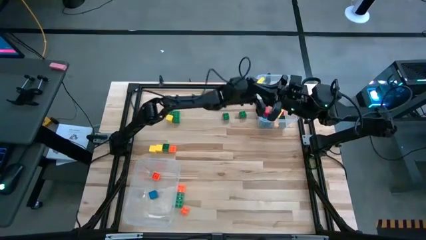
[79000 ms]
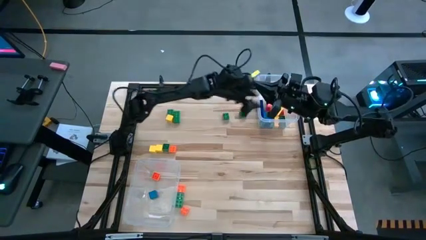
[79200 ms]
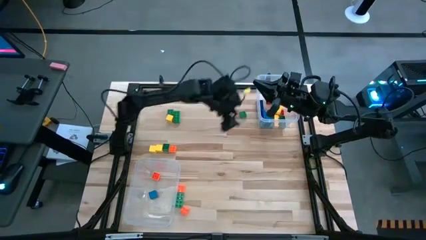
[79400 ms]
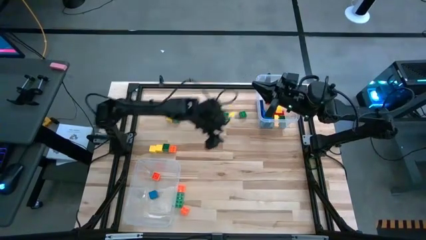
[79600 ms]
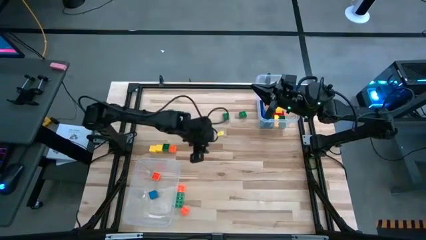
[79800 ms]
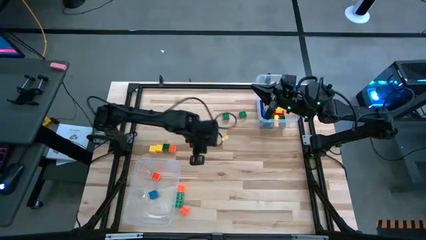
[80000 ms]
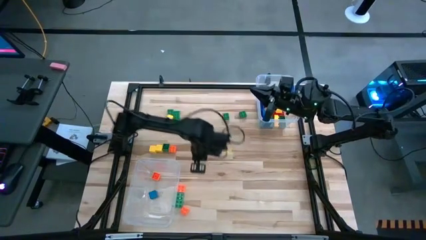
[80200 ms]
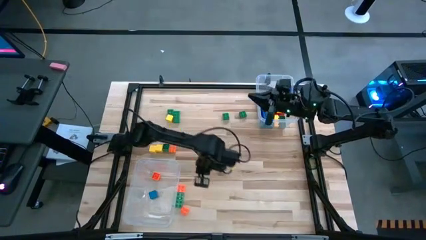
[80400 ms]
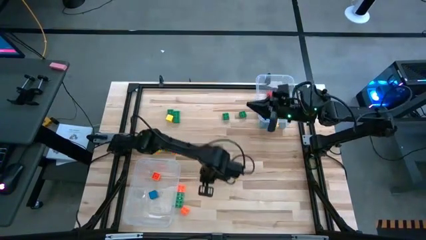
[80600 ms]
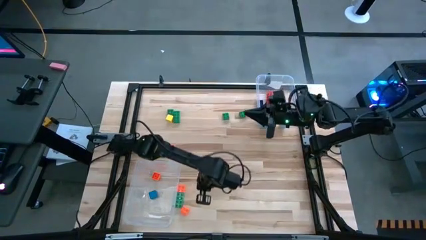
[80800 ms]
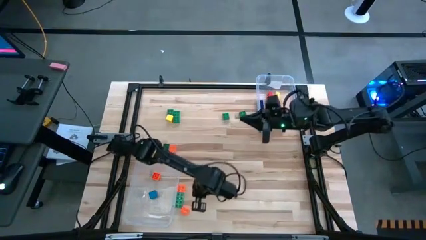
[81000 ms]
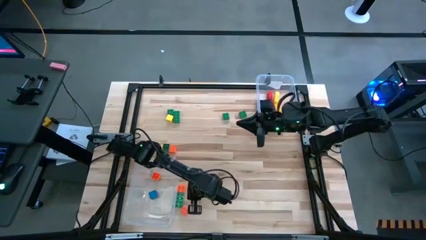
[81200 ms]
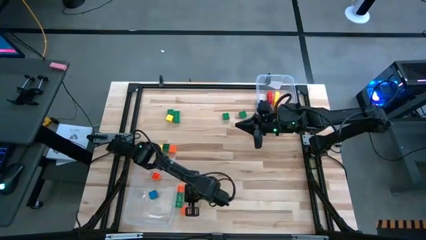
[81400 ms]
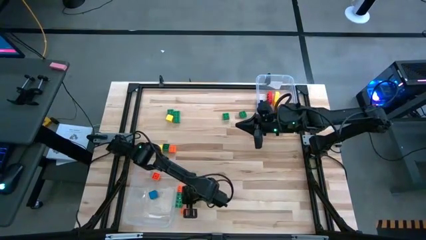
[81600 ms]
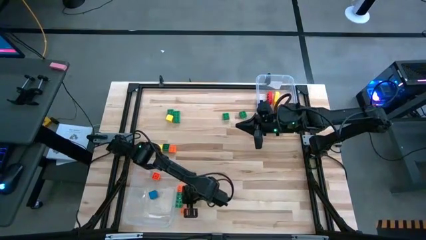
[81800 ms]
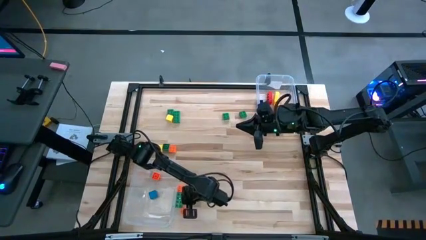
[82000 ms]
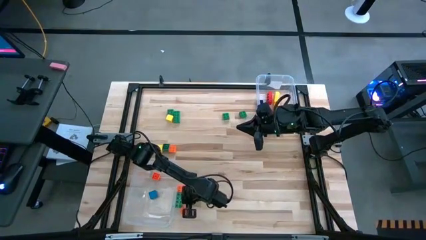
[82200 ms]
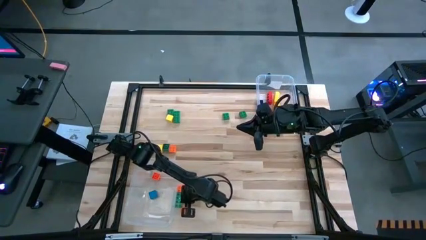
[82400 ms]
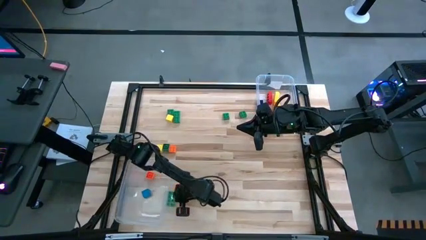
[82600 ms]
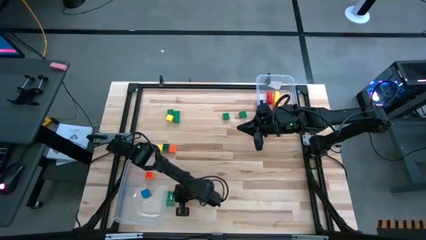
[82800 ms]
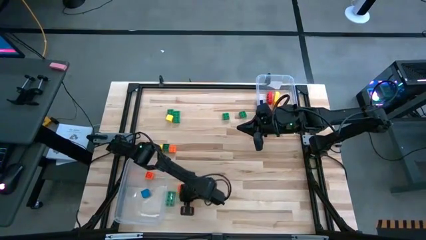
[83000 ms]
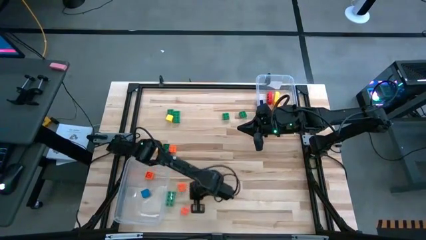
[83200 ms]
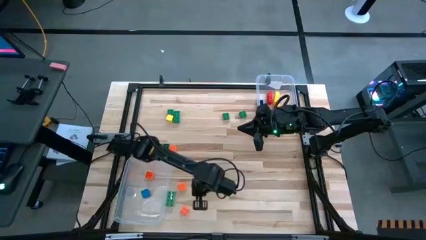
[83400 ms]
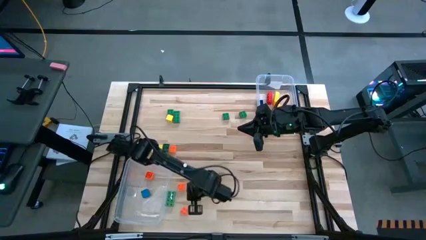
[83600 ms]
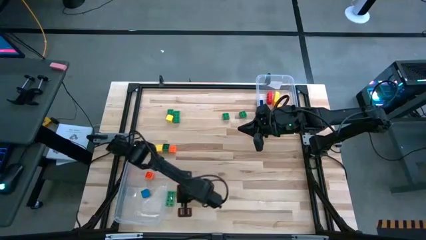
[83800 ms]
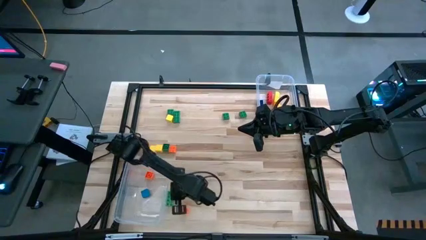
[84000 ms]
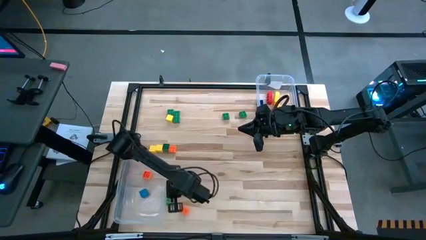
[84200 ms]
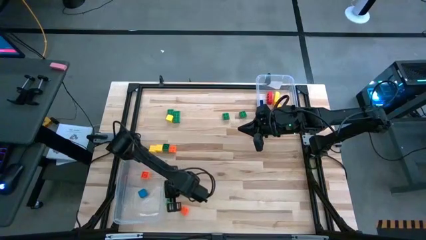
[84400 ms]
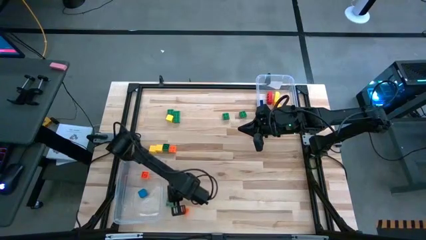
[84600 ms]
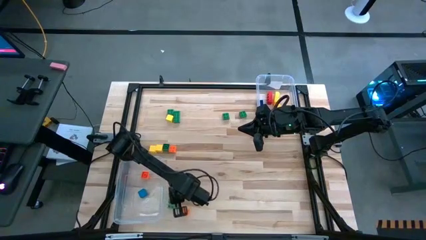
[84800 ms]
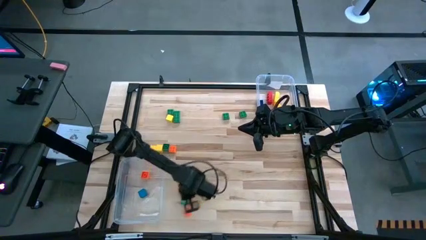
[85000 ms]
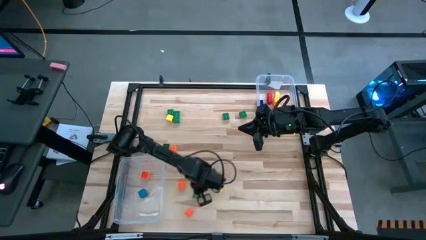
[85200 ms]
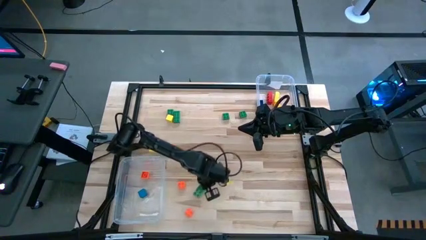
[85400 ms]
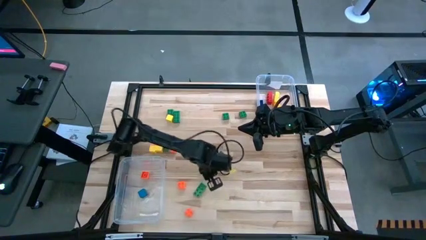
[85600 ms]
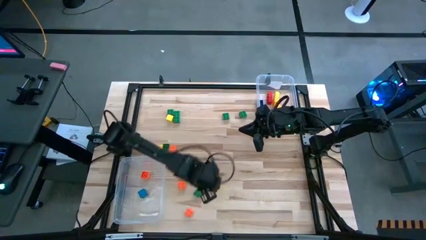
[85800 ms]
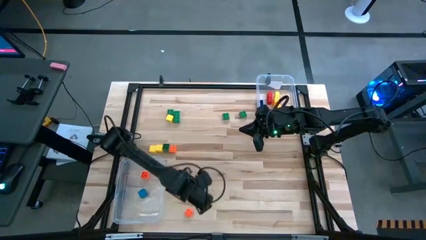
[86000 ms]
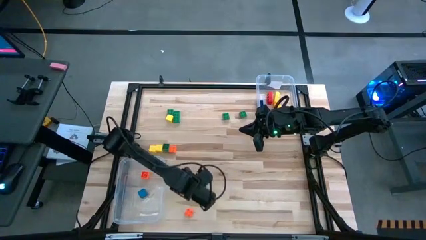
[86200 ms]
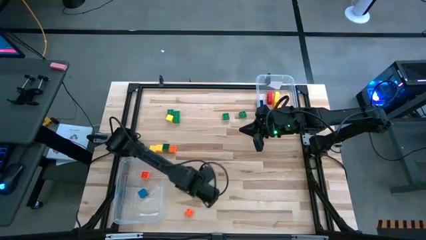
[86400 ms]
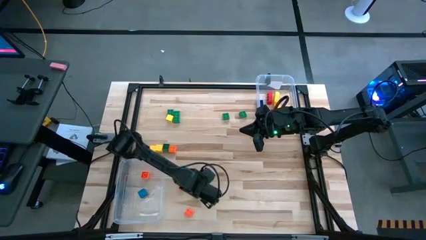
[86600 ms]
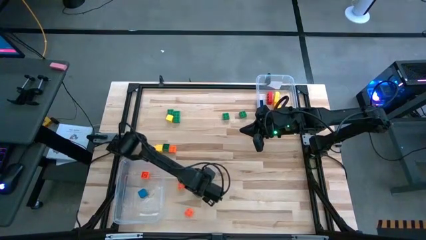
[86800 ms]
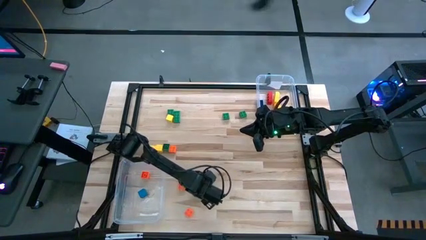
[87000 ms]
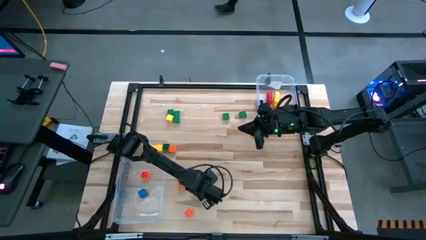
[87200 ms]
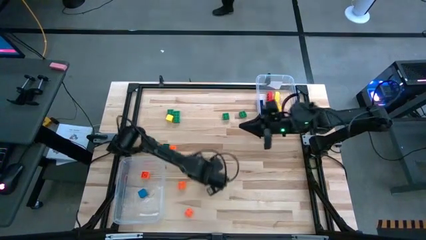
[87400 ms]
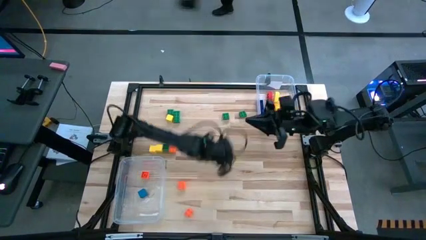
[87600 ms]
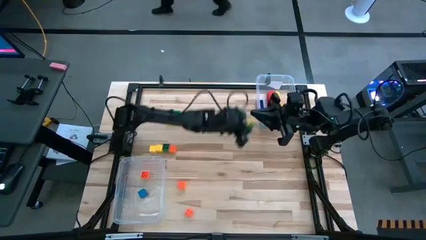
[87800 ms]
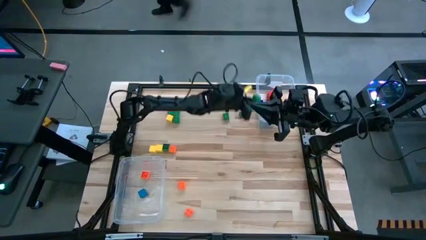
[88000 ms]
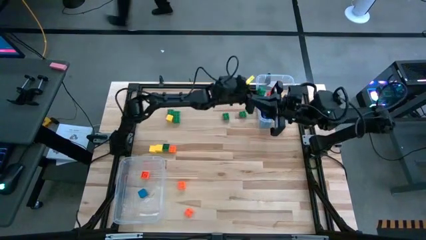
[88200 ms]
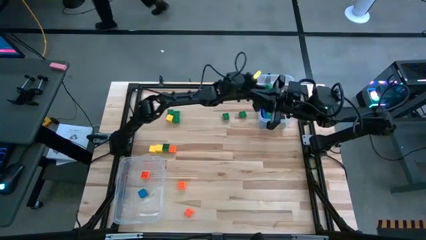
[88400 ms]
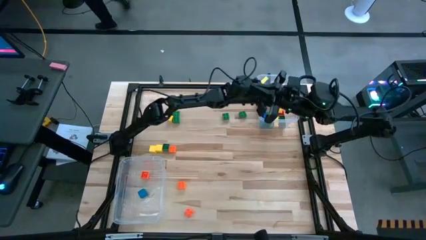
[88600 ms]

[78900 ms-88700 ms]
Task: Sort blocks by size
Put the bottom large green game piece into the right transparent bin

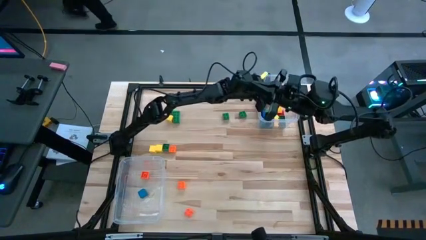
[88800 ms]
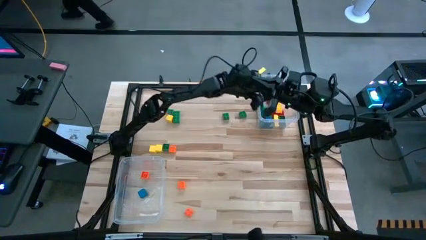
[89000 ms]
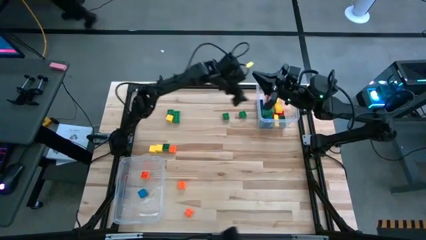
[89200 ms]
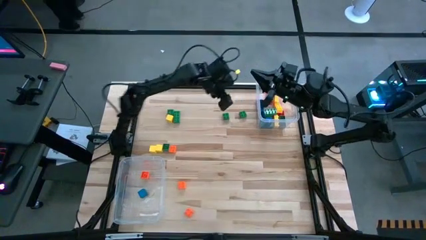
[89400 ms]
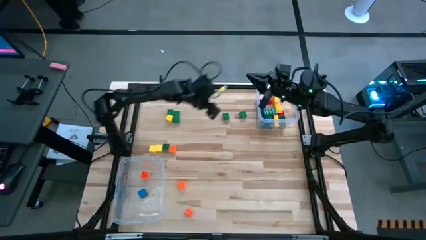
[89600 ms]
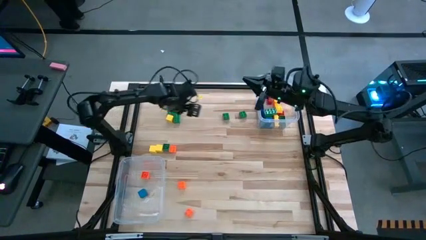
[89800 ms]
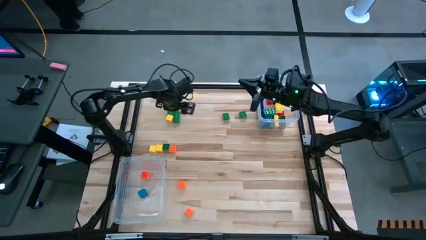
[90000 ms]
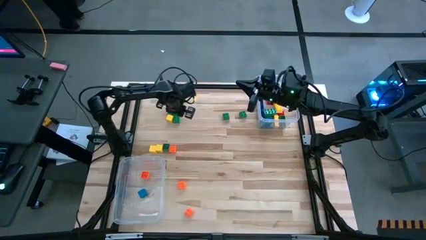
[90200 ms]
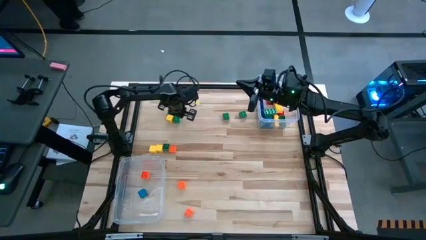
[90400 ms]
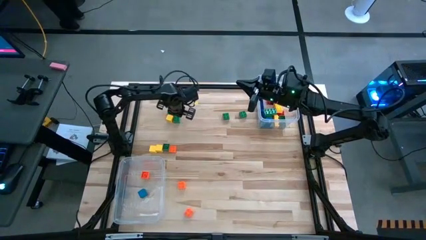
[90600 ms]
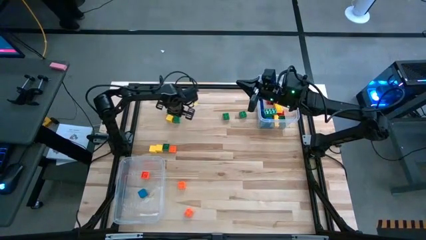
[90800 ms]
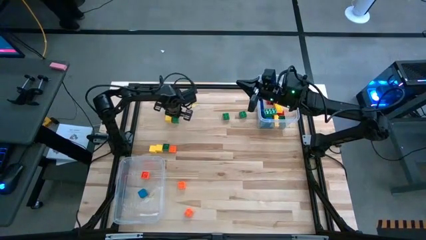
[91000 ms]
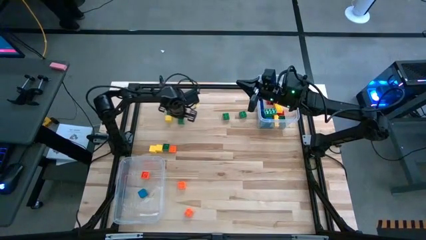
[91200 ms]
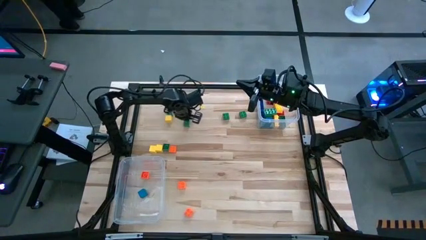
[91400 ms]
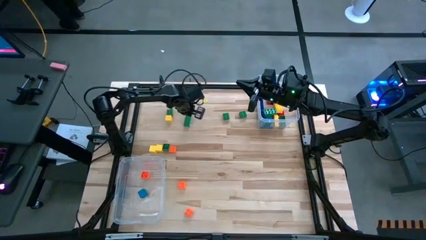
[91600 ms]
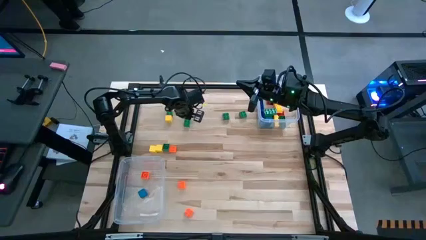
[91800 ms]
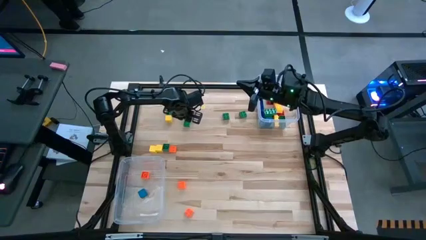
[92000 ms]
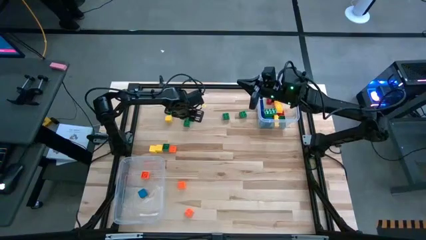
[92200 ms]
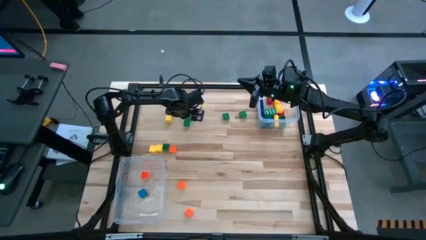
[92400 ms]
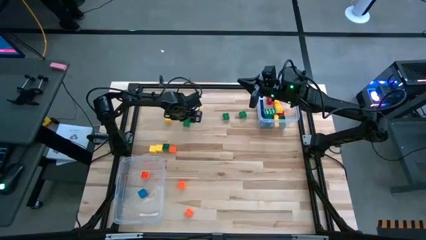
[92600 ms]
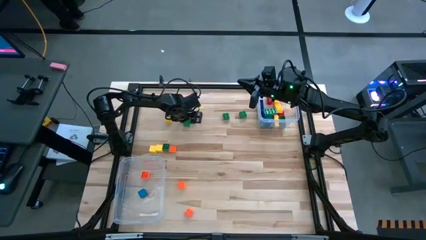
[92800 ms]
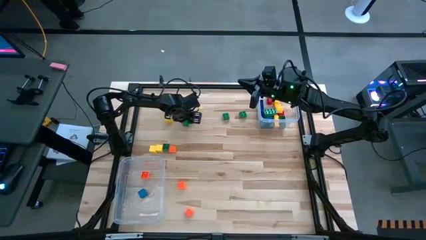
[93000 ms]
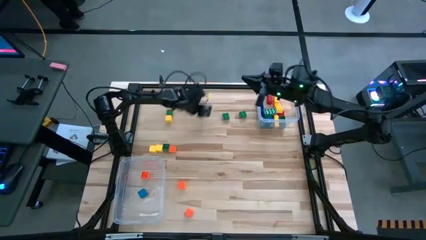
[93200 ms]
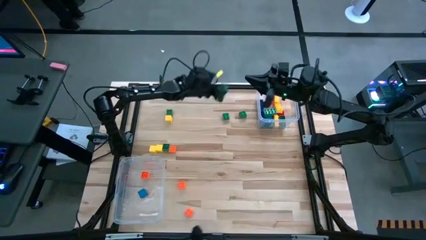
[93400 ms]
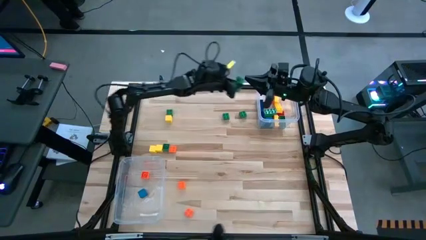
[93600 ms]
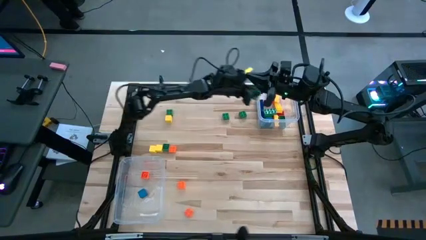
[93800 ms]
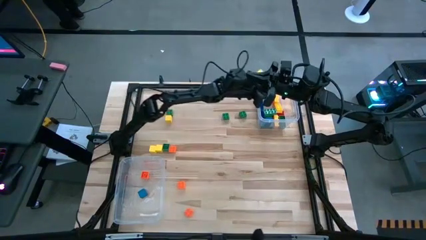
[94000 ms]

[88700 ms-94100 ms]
Put the large green game piece into the right transparent bin

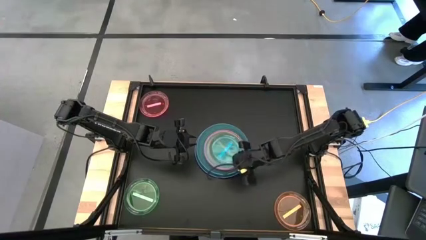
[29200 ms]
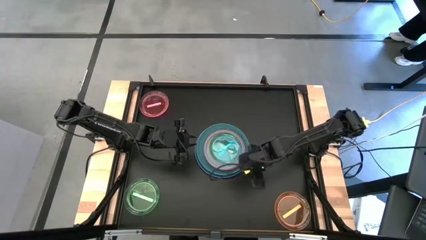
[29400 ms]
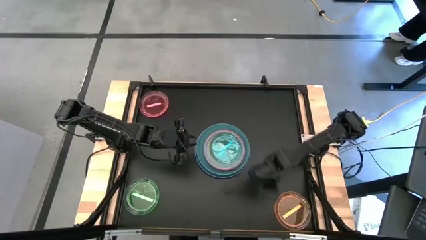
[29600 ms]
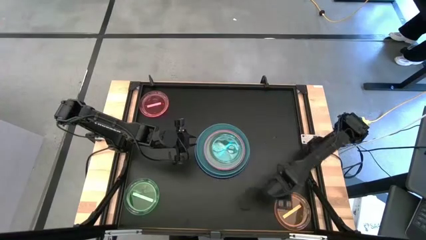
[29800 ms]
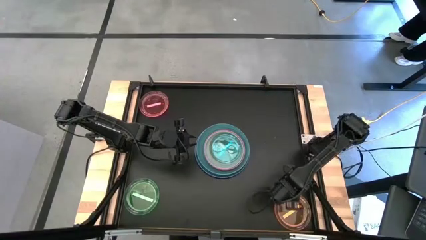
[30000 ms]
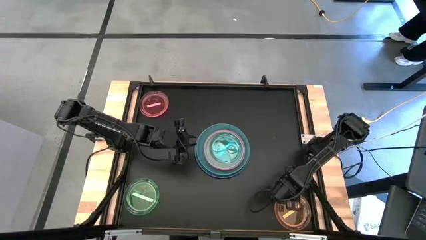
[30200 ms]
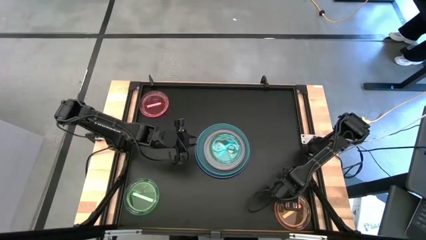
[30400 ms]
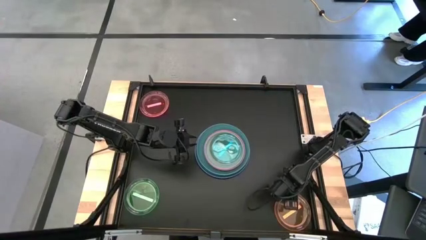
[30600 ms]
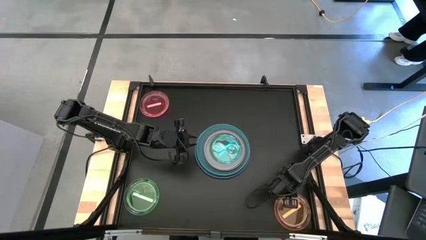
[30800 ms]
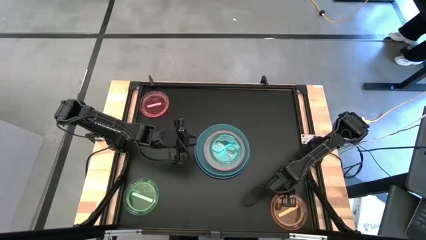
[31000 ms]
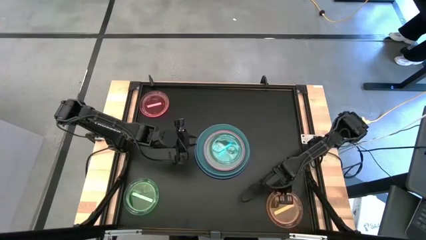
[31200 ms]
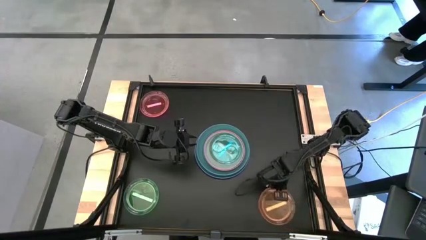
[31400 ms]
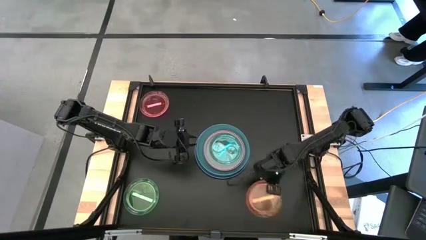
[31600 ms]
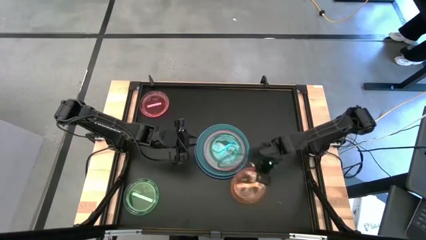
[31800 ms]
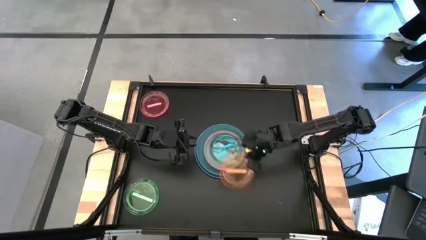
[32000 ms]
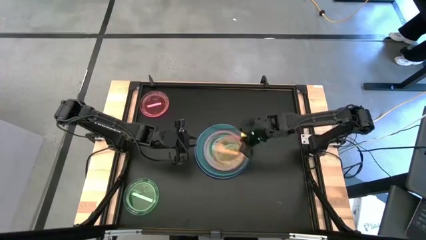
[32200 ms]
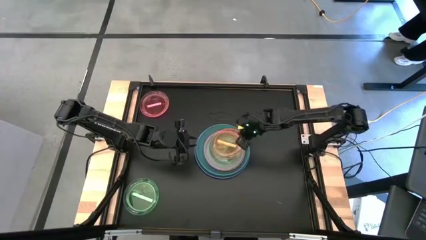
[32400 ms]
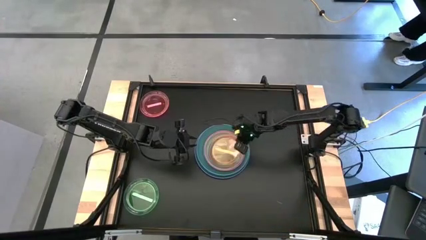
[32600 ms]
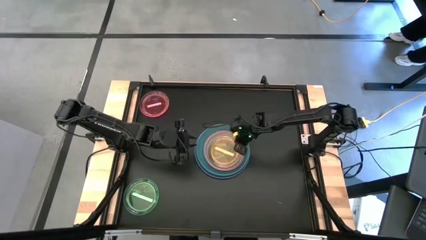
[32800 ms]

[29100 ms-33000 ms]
Task: Stack plastic plates
Stack the orange plate on top of the blue plate
